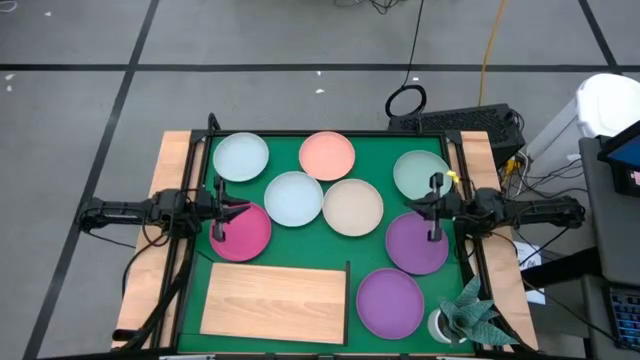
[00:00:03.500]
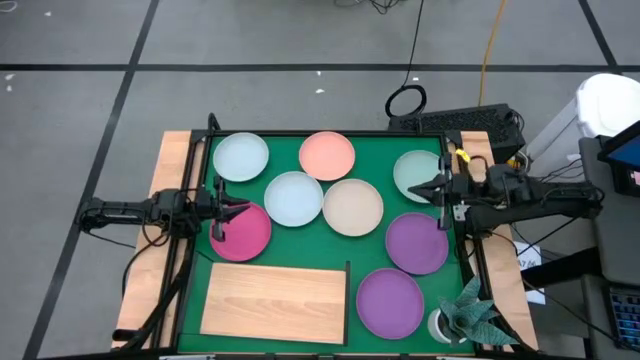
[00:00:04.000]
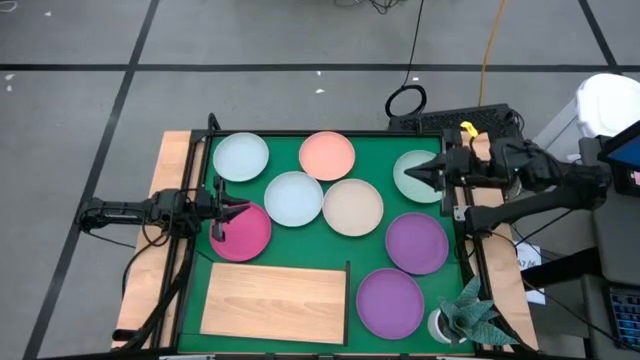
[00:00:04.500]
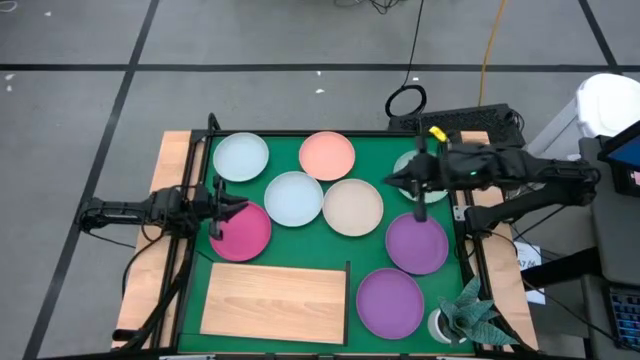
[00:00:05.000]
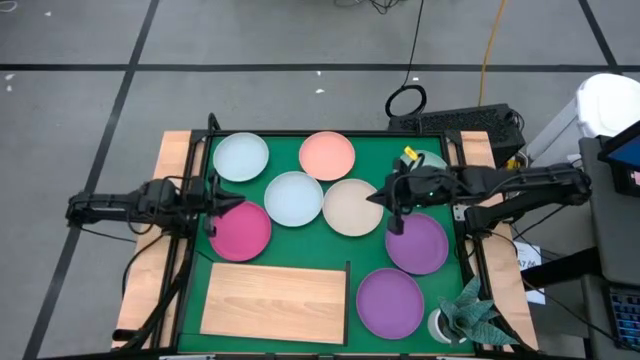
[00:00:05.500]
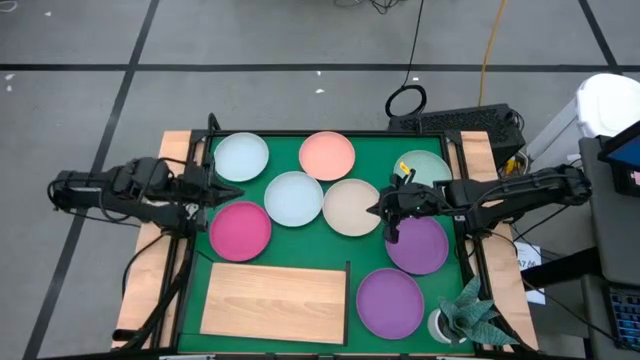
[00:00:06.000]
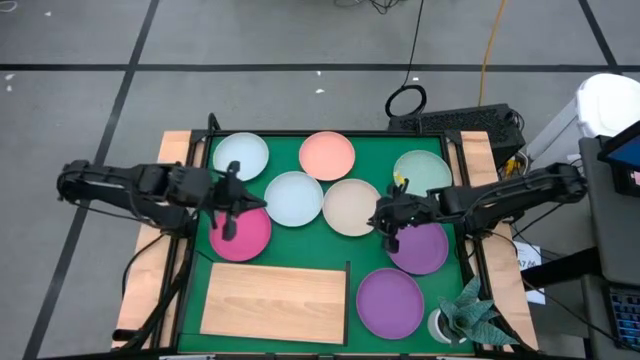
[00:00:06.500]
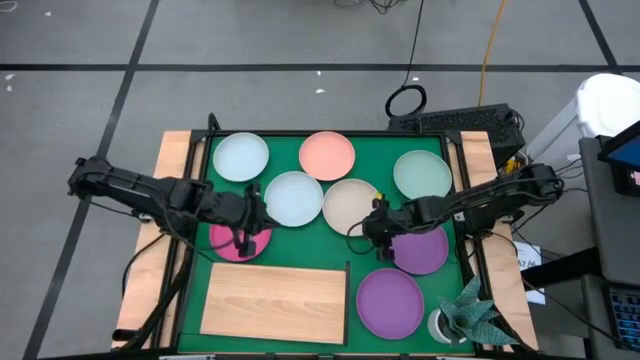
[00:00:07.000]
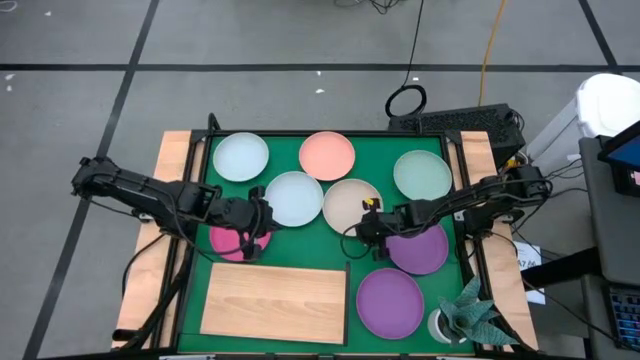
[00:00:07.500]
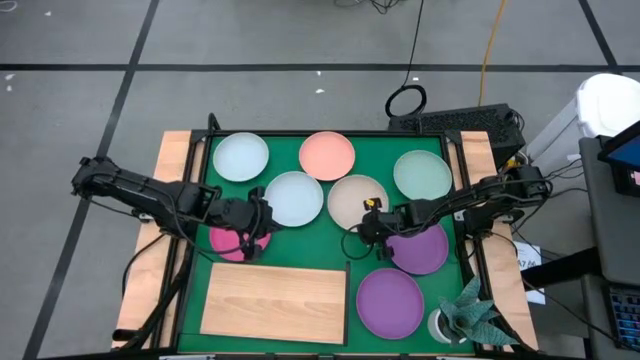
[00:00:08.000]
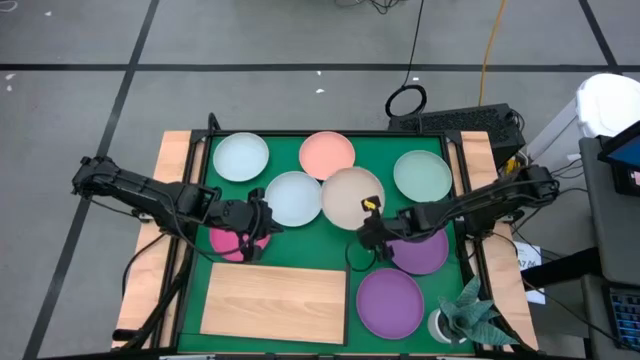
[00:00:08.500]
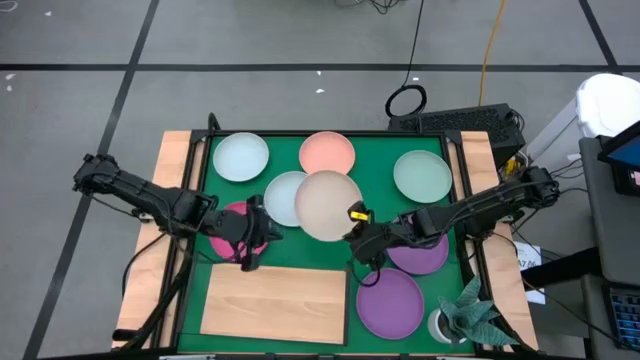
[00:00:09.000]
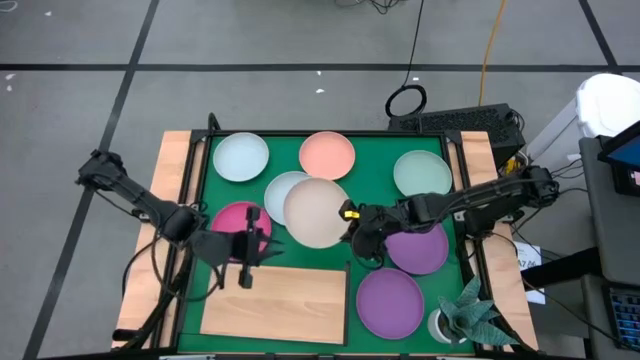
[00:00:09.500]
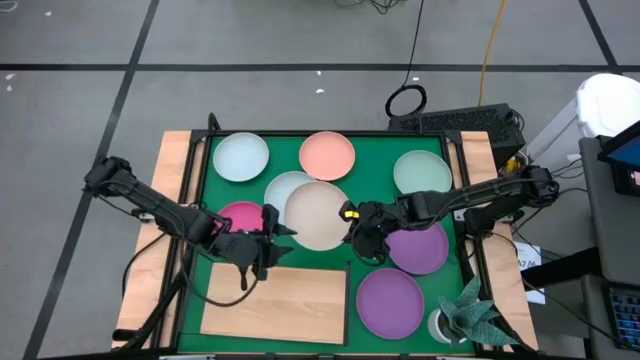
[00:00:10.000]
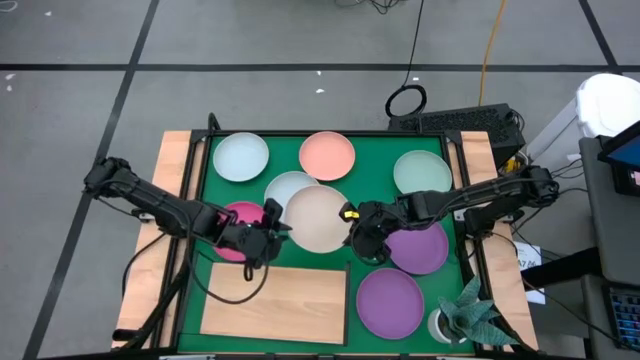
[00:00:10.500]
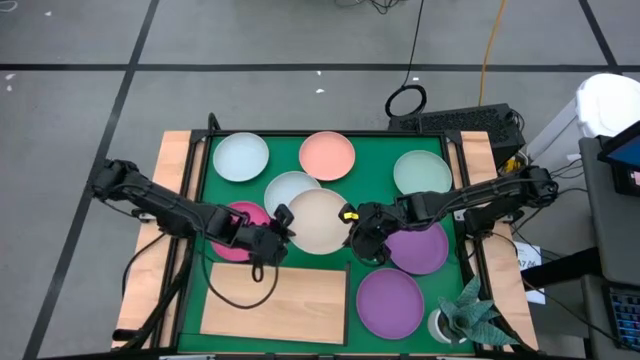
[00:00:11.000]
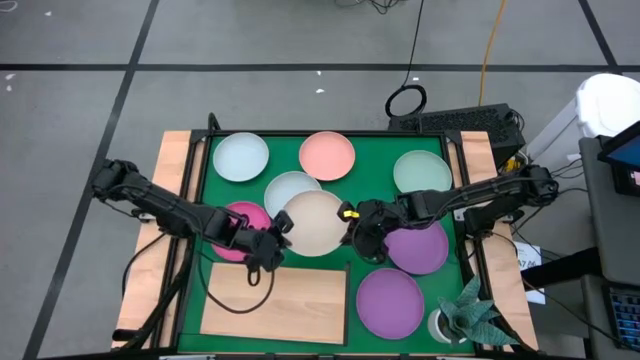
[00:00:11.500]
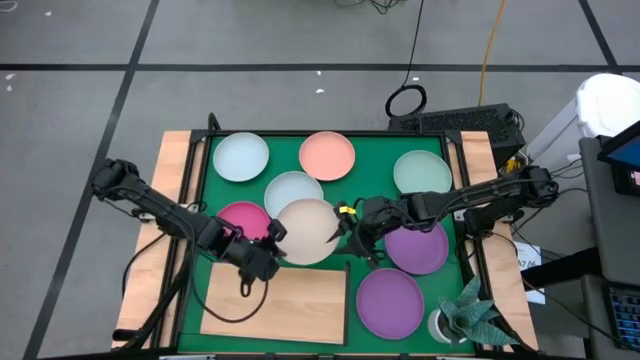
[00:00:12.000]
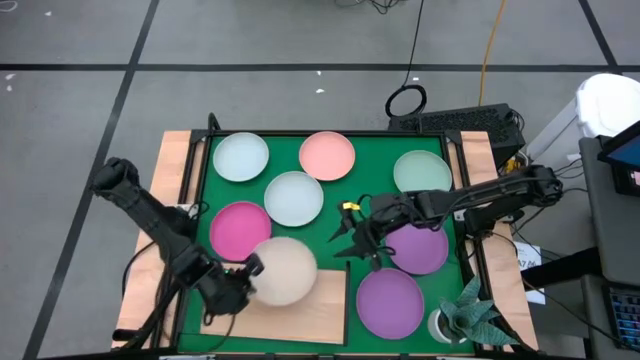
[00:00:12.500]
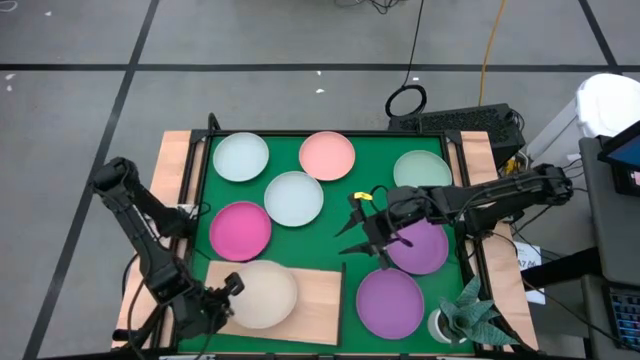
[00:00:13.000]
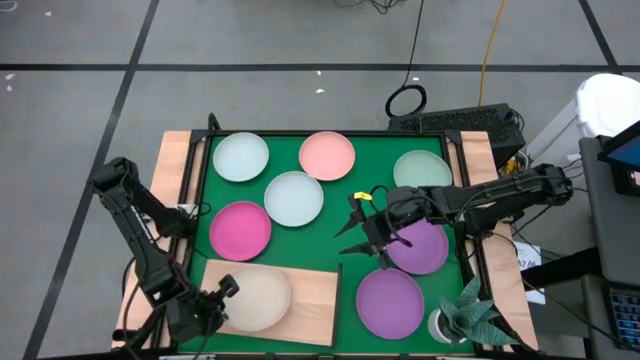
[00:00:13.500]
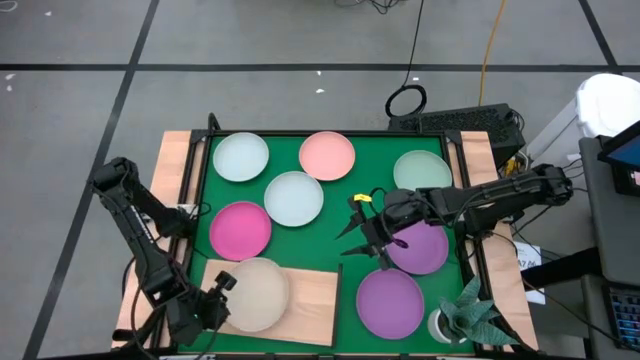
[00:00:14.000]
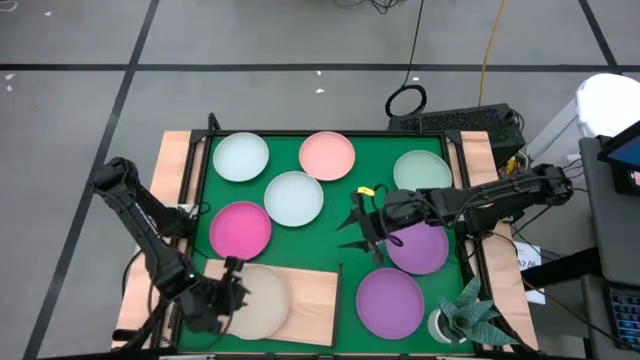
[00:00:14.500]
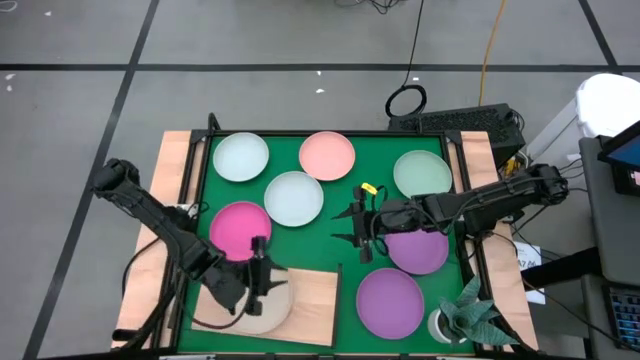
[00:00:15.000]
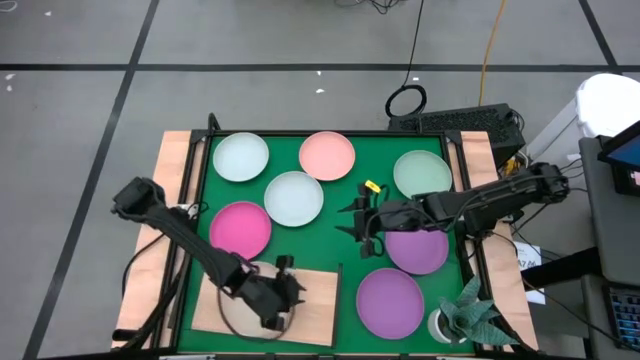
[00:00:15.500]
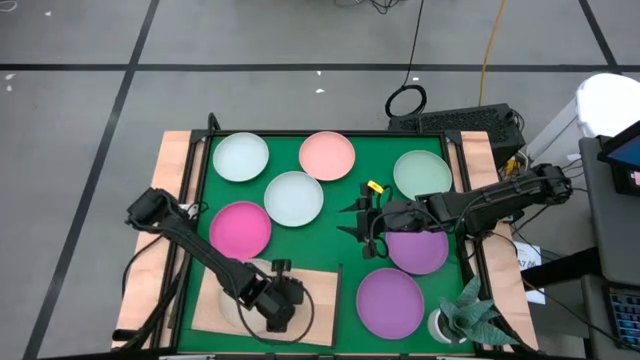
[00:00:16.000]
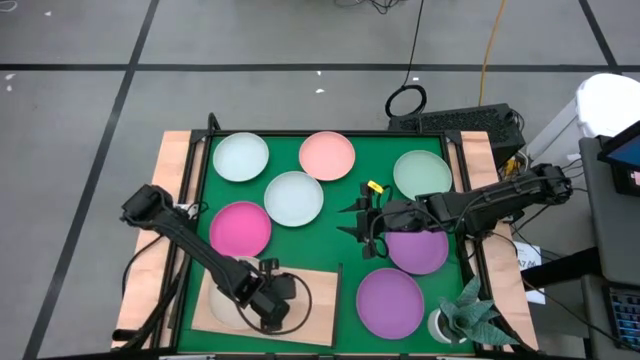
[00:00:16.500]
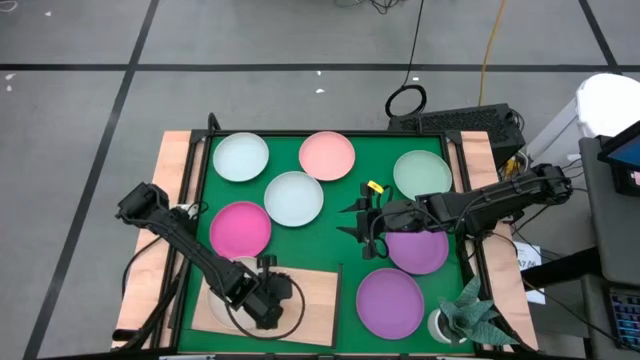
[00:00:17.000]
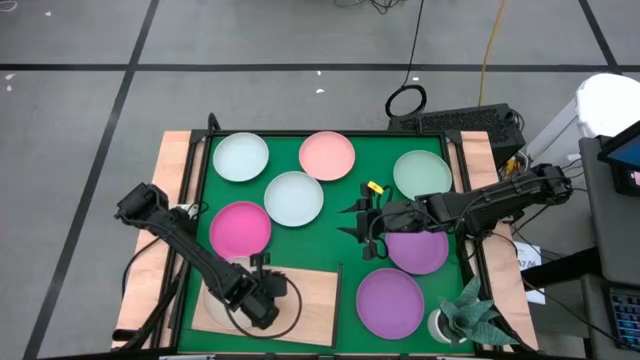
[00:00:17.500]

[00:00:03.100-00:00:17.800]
Task: Place and stack plates onto a shelf
Put the brown plate on the shelf

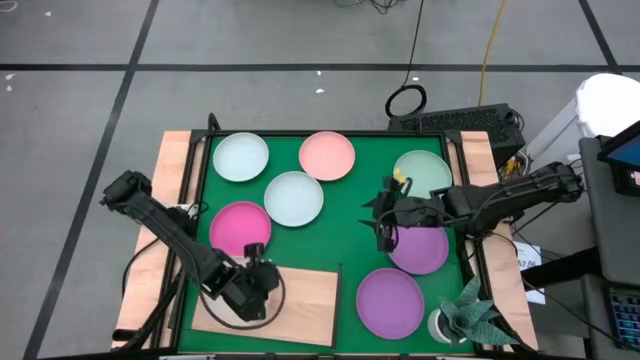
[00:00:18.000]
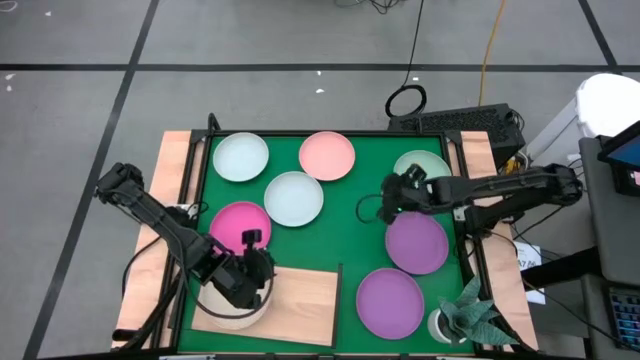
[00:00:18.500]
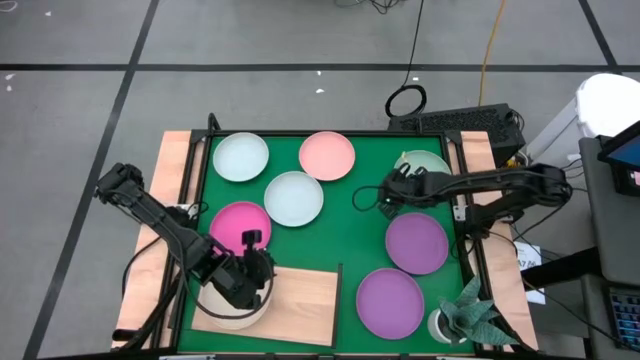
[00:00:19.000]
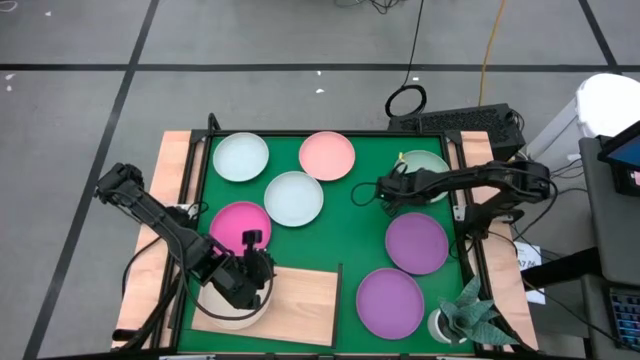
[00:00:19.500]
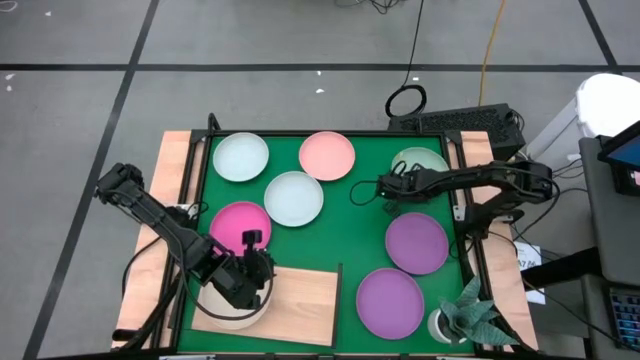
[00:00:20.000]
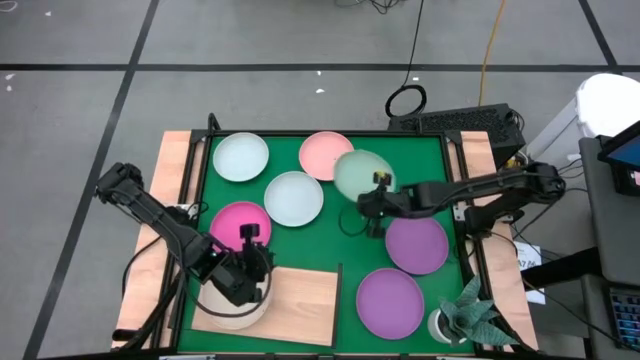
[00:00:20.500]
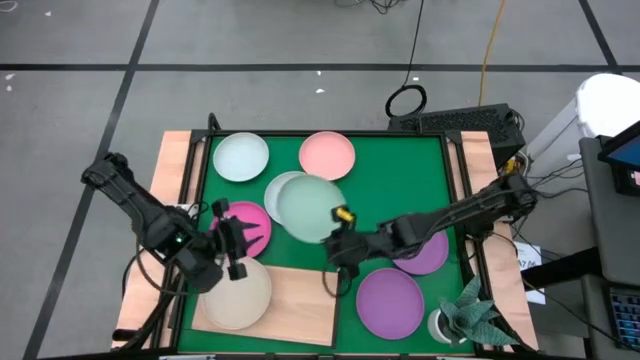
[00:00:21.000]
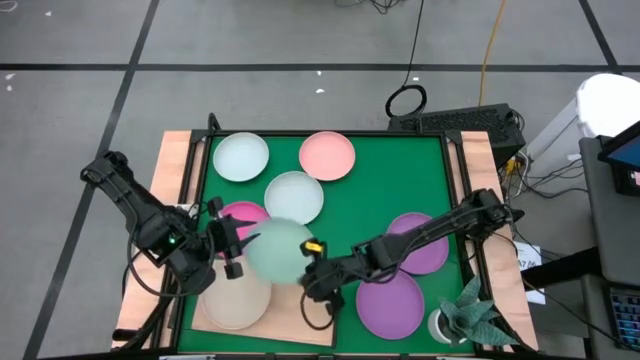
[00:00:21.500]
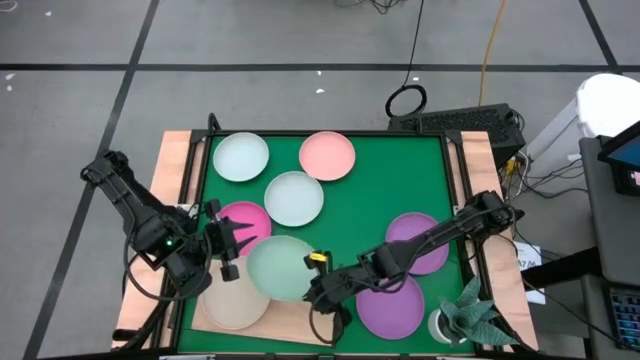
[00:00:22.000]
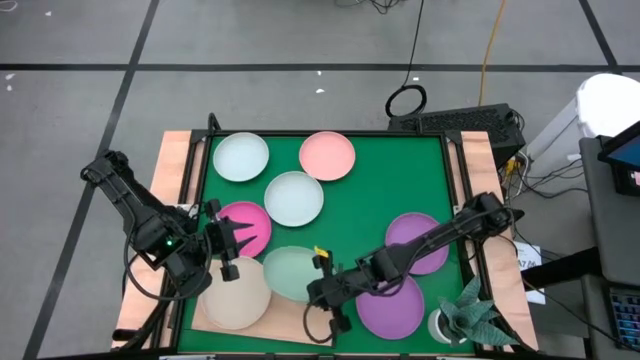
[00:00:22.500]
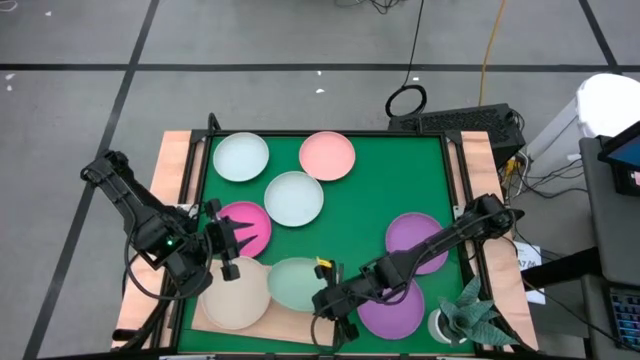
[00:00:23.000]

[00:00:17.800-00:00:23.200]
Put the light green plate on the shelf
